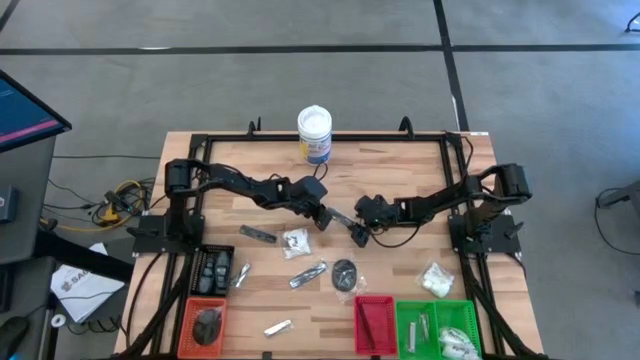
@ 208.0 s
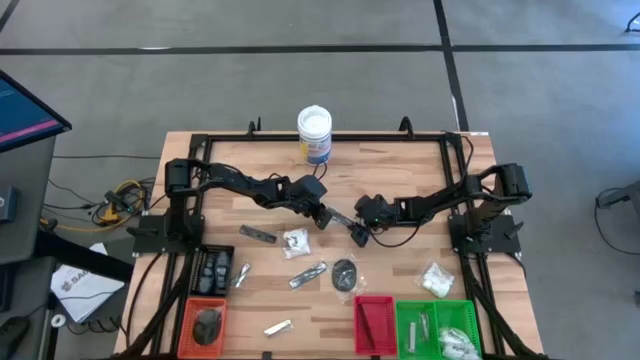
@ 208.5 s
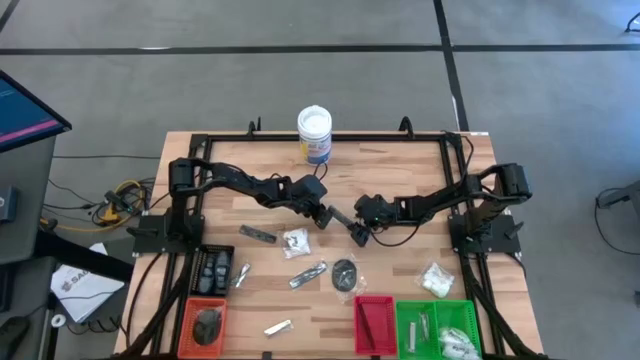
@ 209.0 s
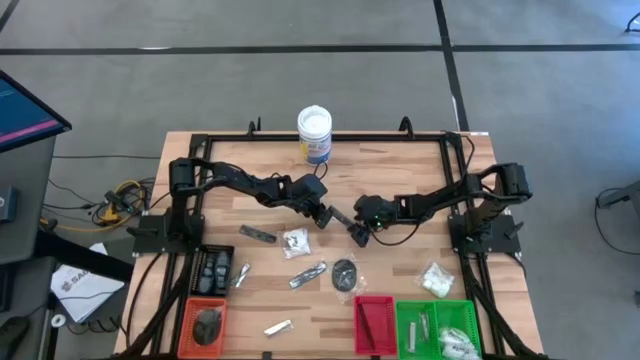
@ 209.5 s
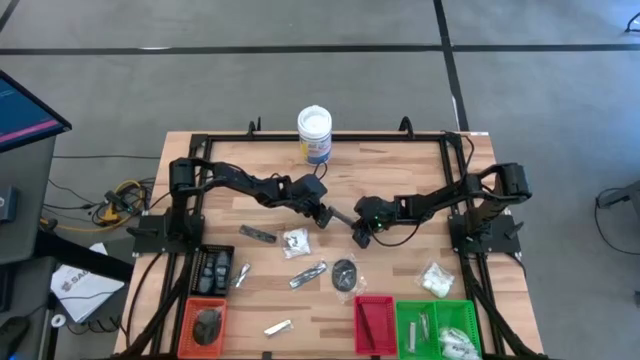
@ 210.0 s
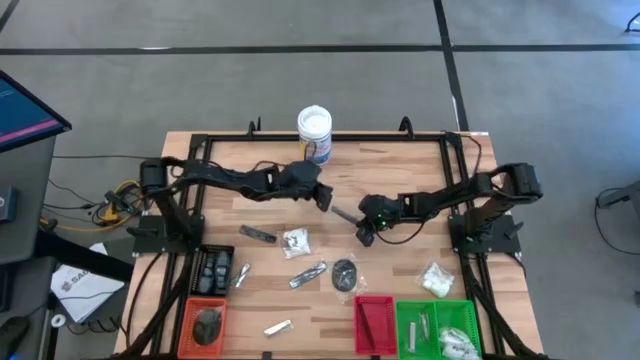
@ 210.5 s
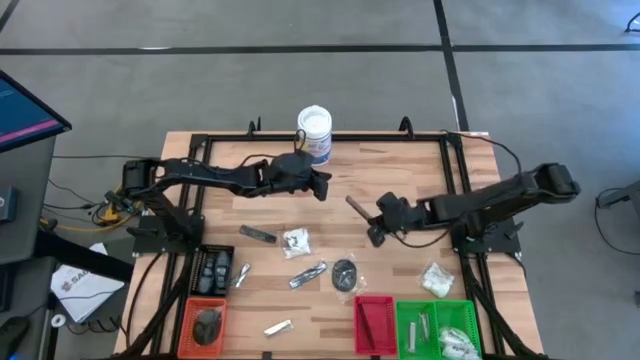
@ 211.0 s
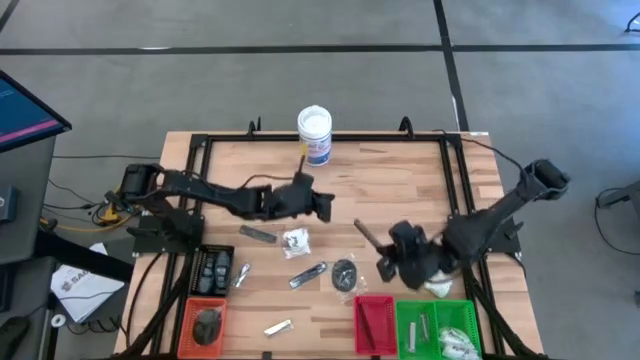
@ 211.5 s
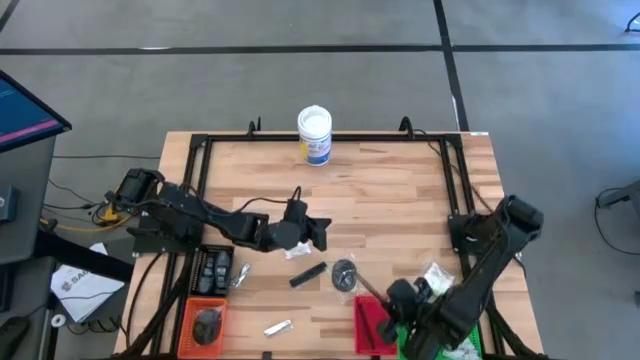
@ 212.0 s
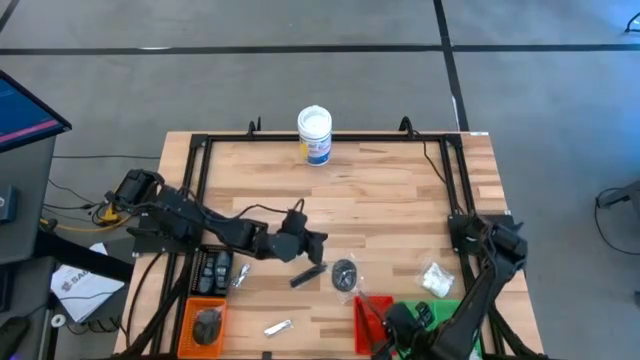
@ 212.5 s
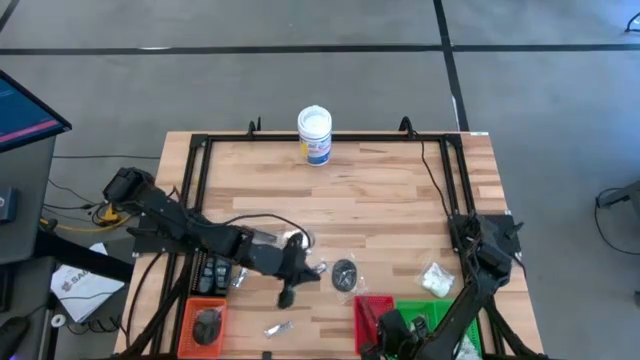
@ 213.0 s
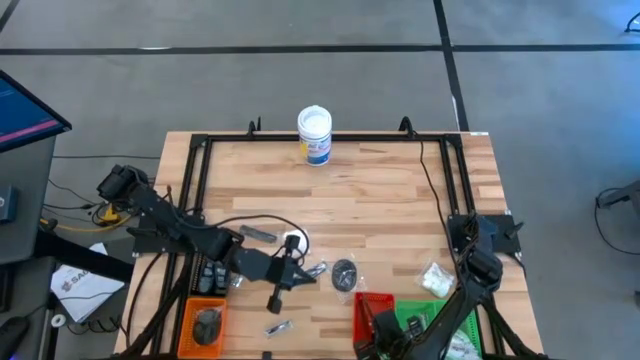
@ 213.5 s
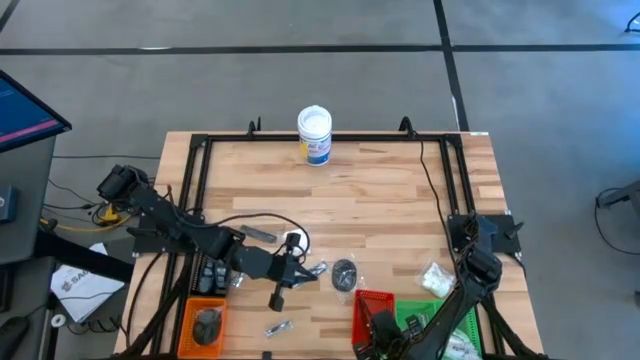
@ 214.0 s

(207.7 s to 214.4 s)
Task: Pick & Place Travel size toiletries
Put the black comb into the red bin

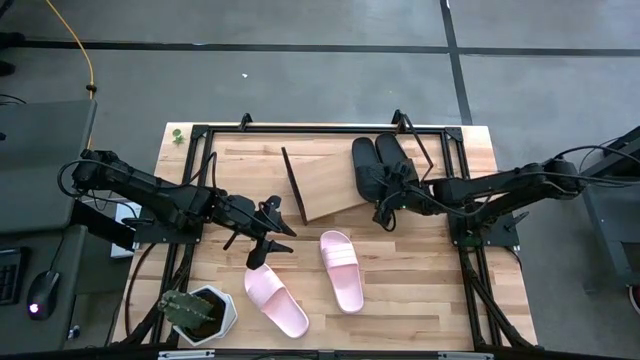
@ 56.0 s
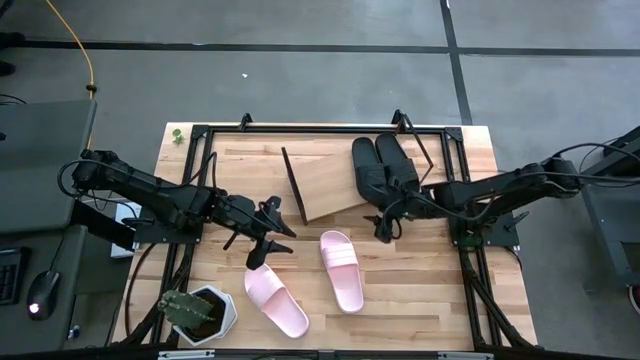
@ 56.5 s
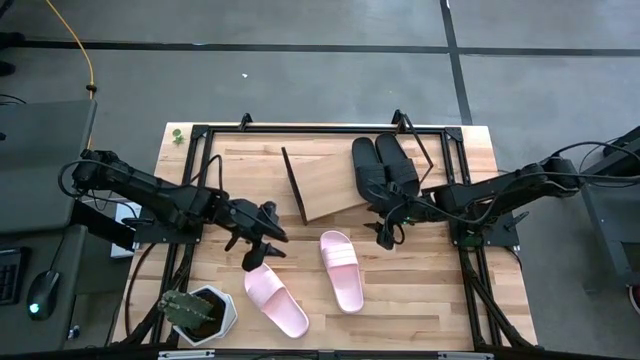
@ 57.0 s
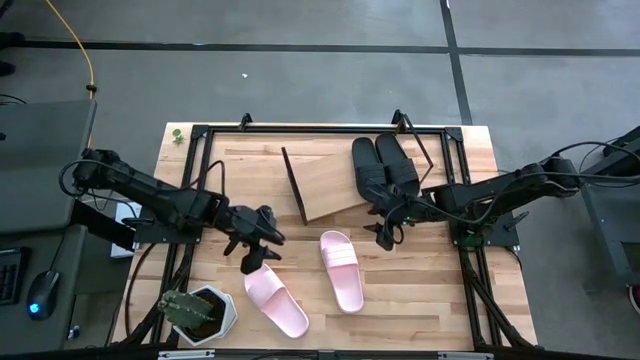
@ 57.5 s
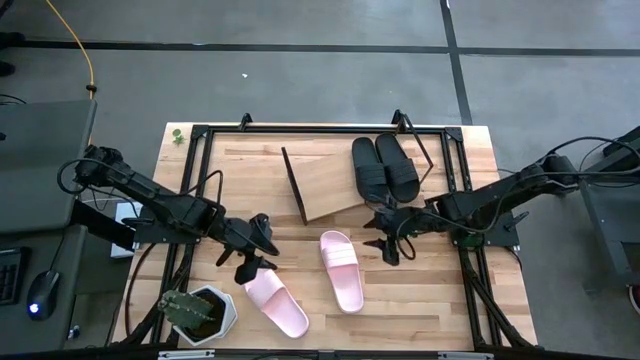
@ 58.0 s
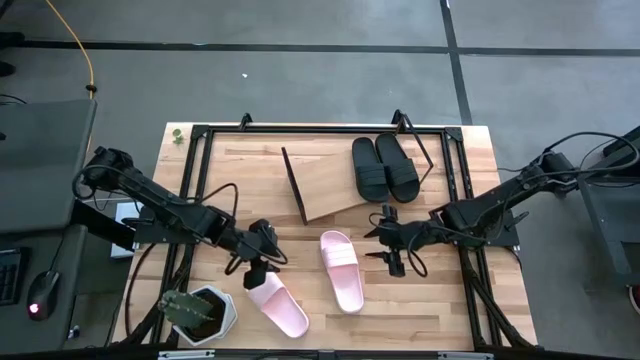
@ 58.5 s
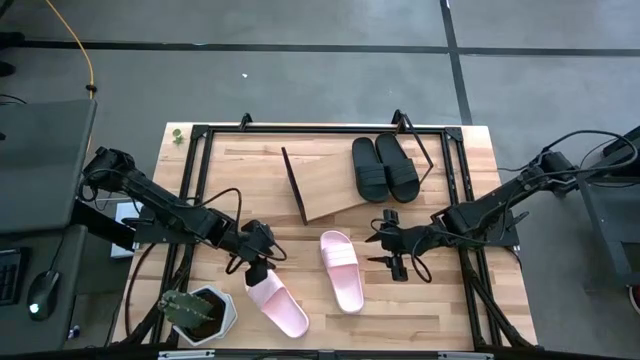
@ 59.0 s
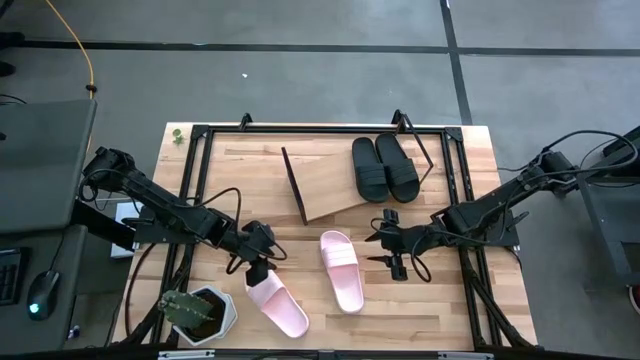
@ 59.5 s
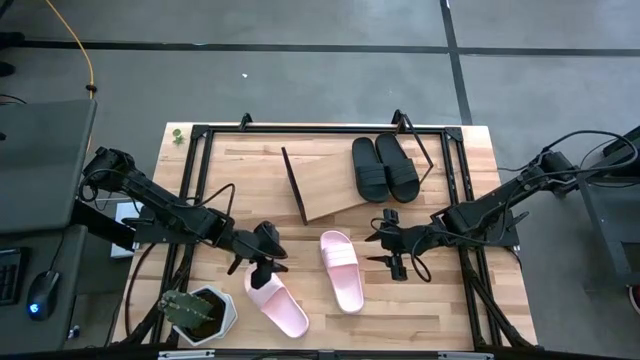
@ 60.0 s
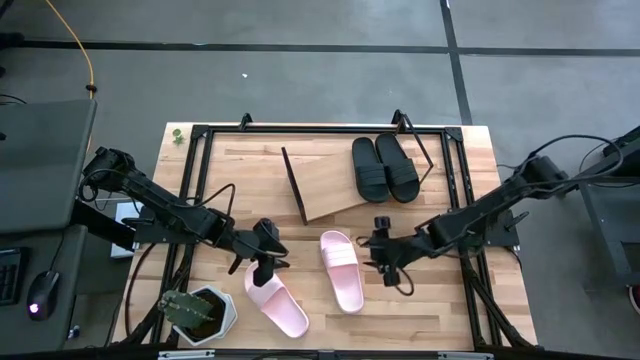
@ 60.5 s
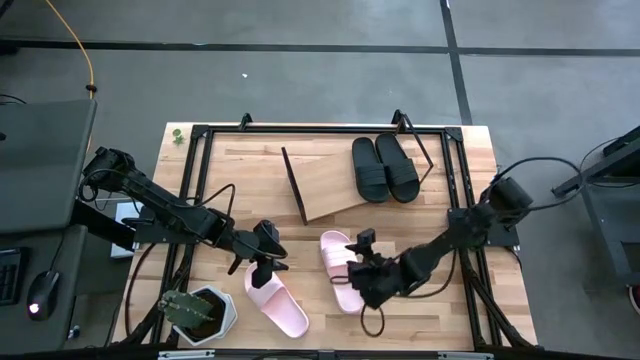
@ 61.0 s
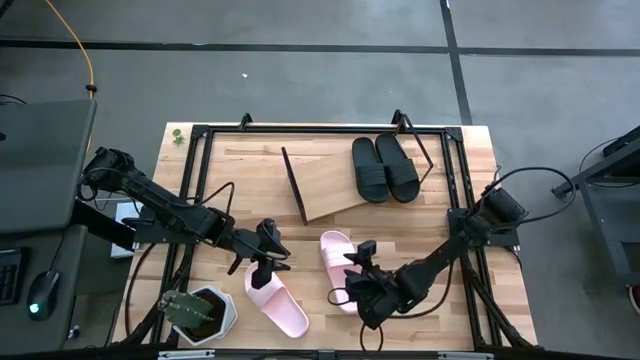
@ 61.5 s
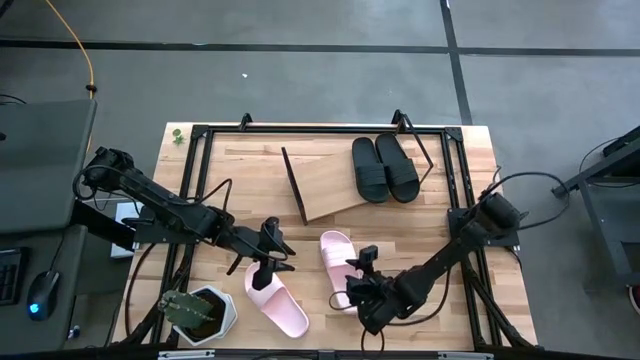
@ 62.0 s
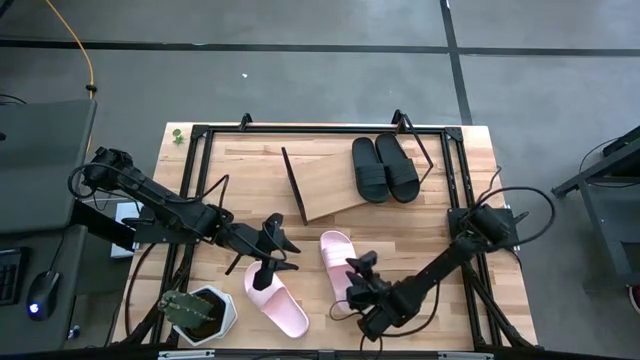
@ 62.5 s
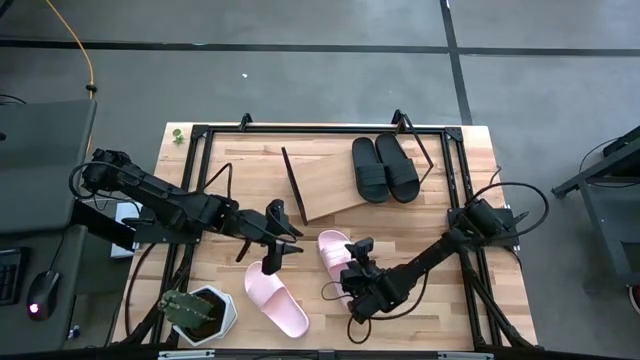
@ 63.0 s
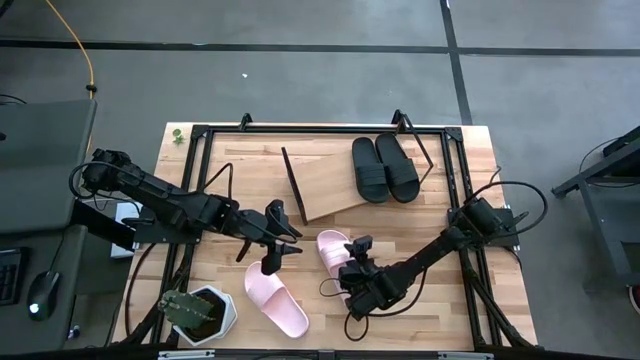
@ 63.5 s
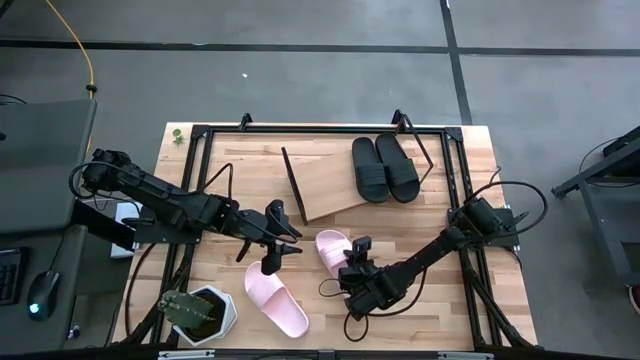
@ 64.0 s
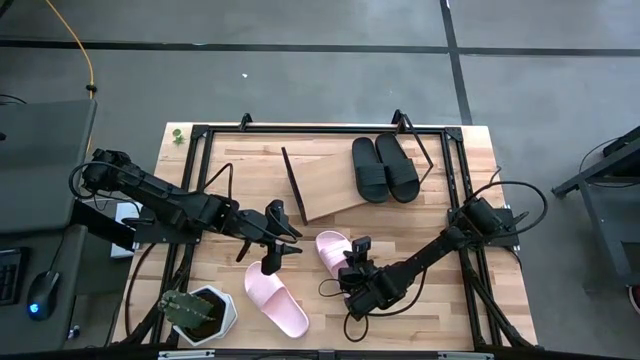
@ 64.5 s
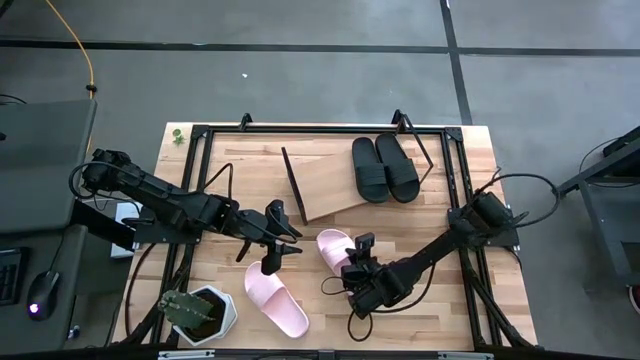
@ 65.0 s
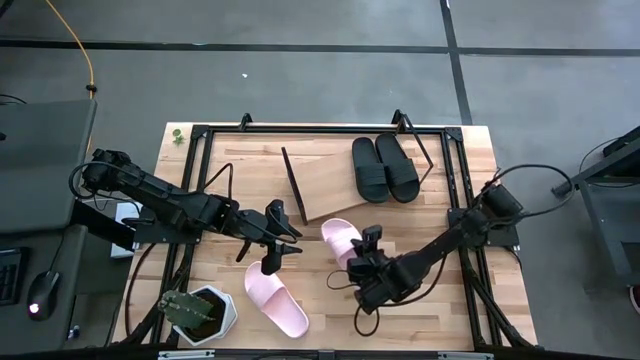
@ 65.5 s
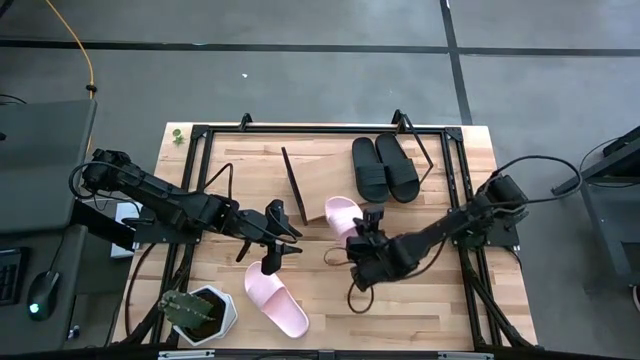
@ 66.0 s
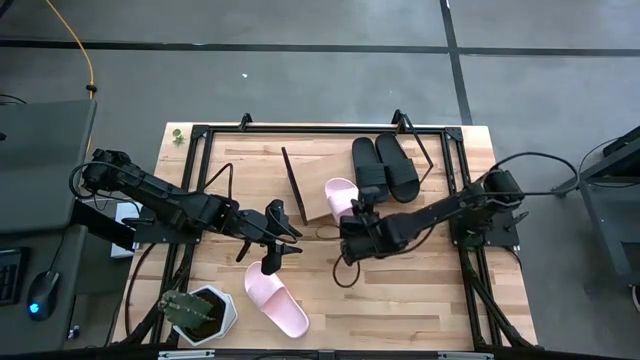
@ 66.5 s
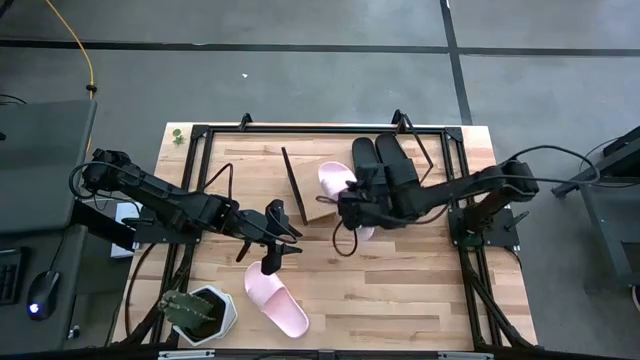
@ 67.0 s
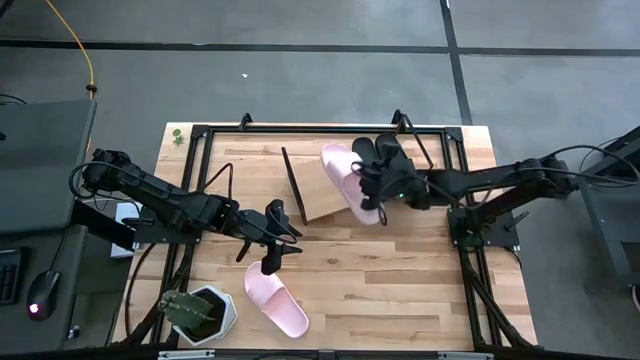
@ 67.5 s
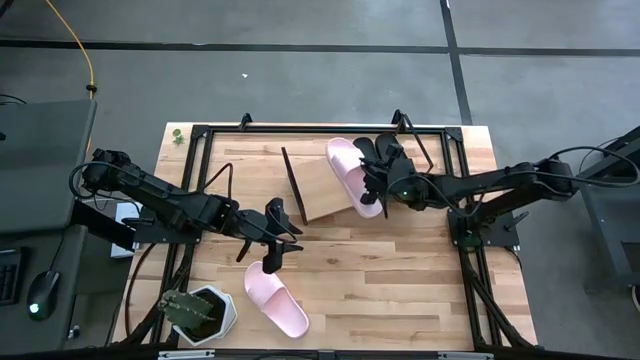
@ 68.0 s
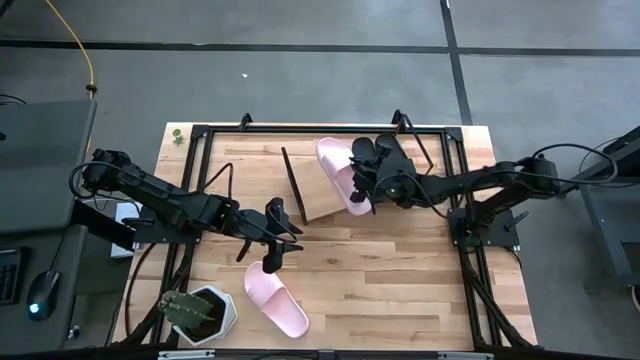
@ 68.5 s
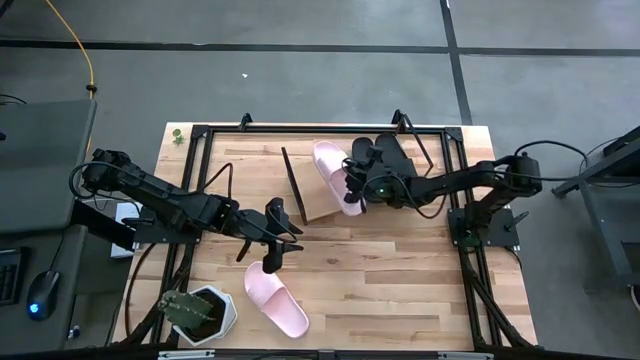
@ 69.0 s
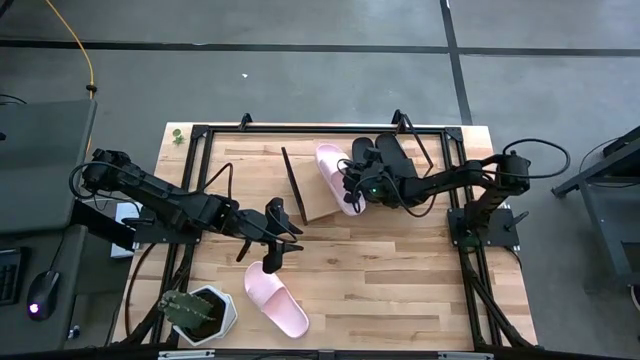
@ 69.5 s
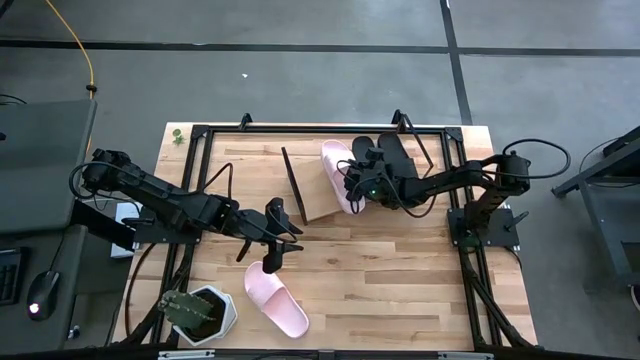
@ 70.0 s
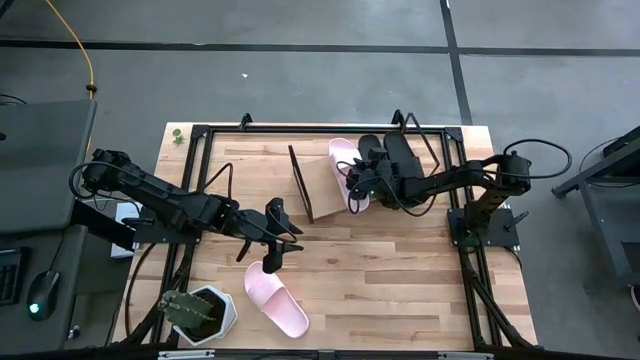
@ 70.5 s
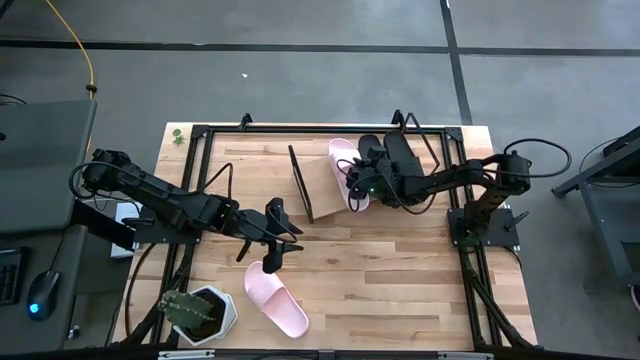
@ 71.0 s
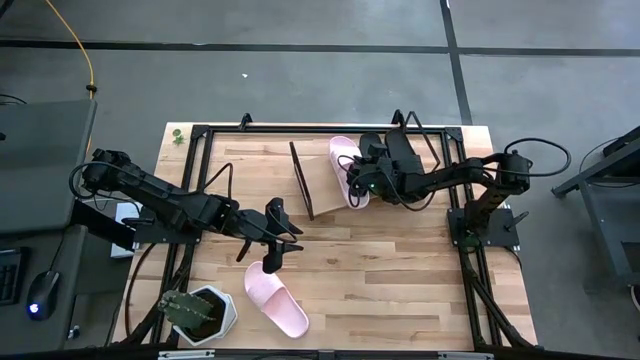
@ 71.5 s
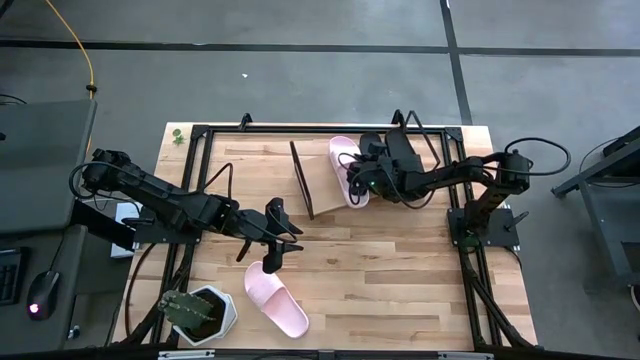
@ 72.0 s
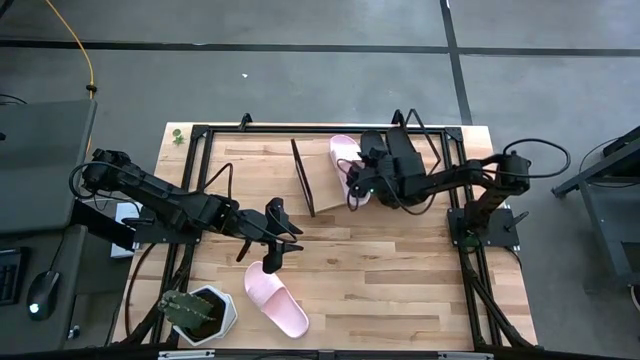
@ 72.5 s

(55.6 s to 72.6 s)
Task: Pick and place slides into the shelf
Put the right pink slipper on the shelf
